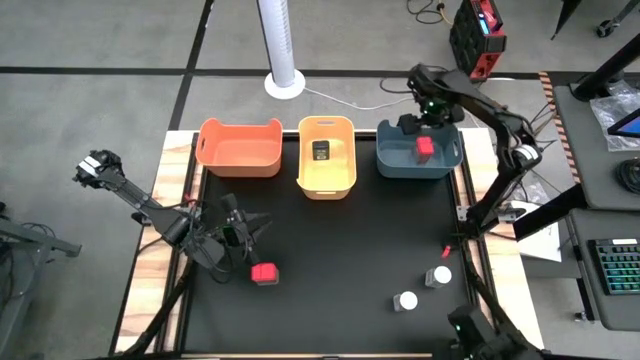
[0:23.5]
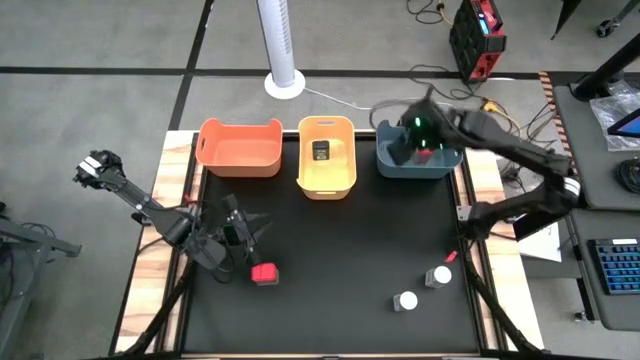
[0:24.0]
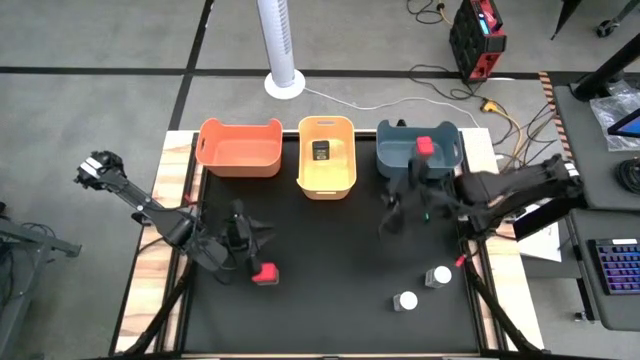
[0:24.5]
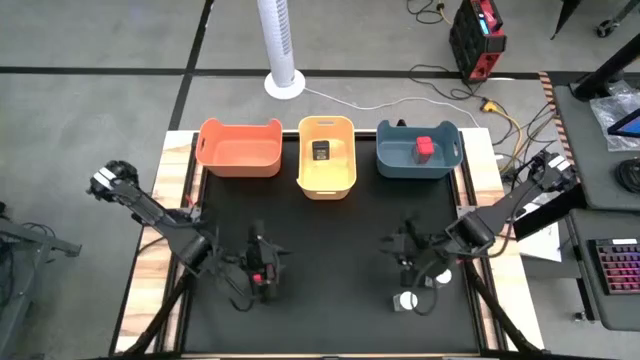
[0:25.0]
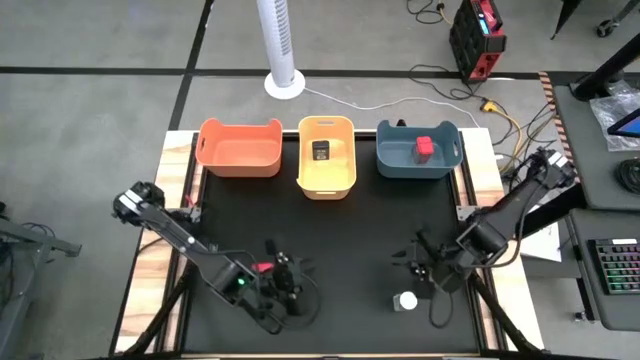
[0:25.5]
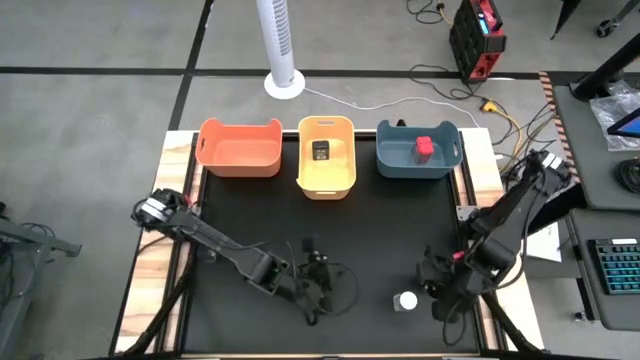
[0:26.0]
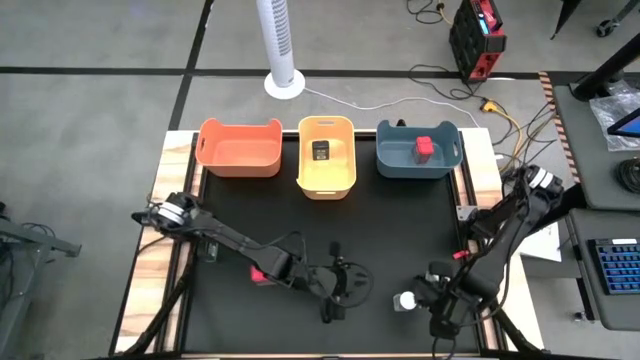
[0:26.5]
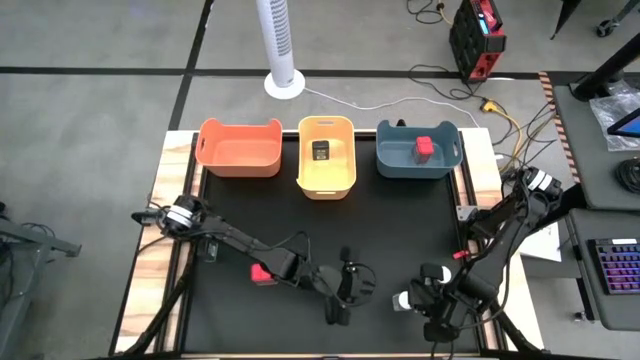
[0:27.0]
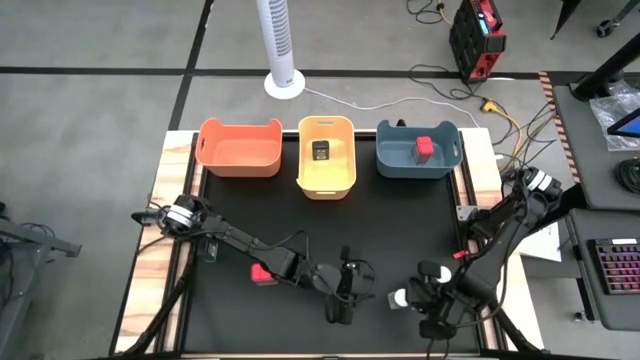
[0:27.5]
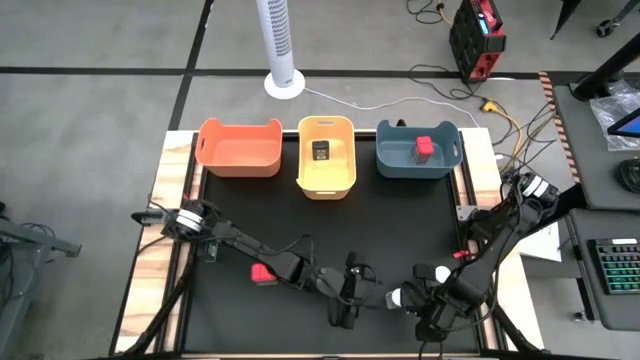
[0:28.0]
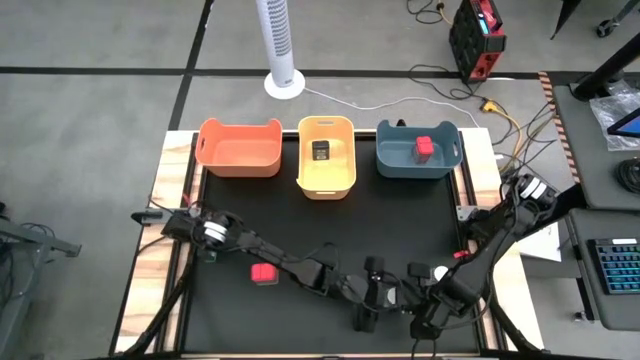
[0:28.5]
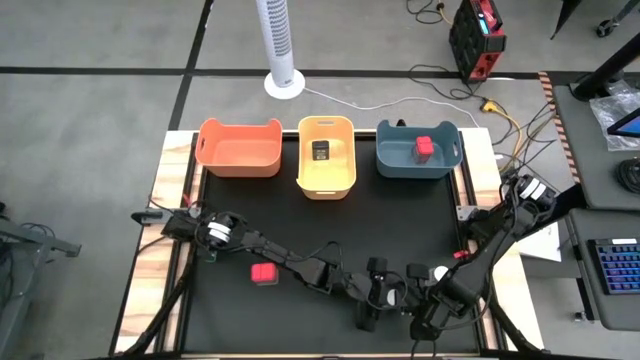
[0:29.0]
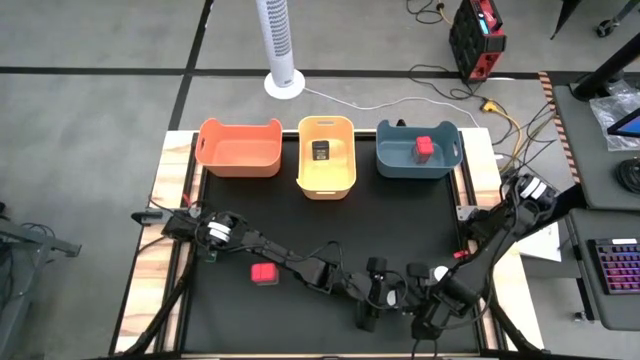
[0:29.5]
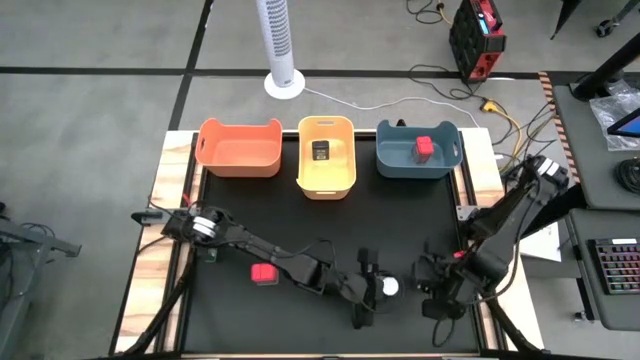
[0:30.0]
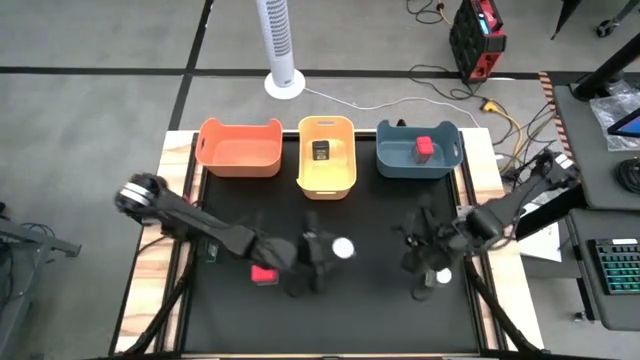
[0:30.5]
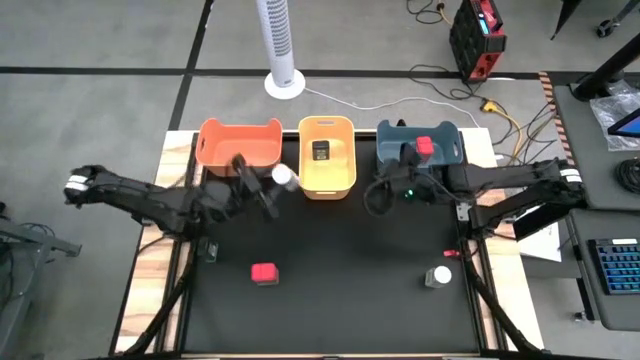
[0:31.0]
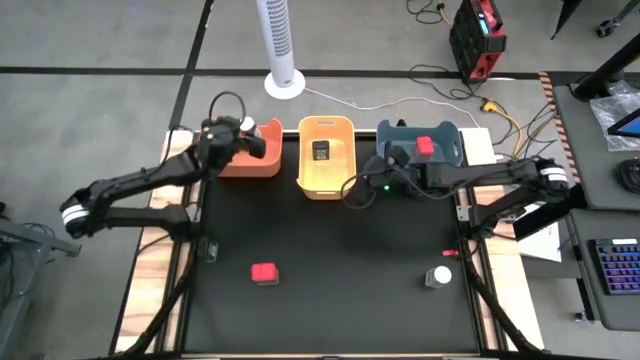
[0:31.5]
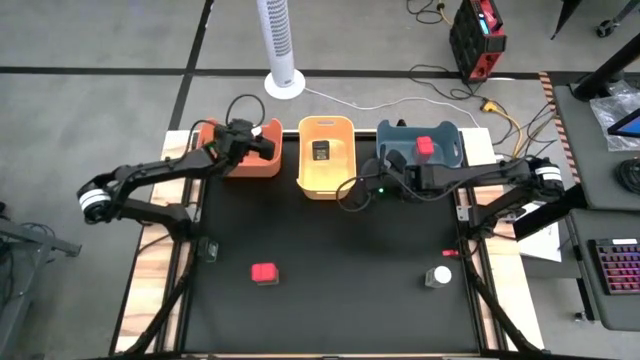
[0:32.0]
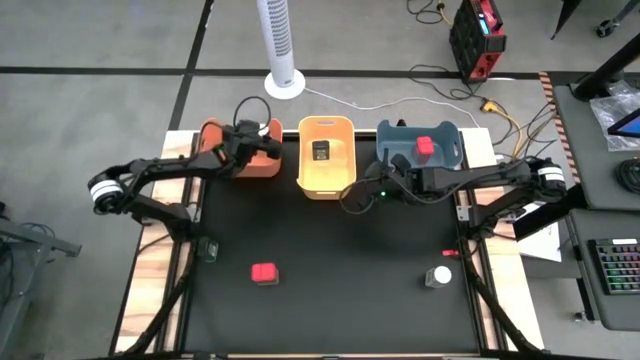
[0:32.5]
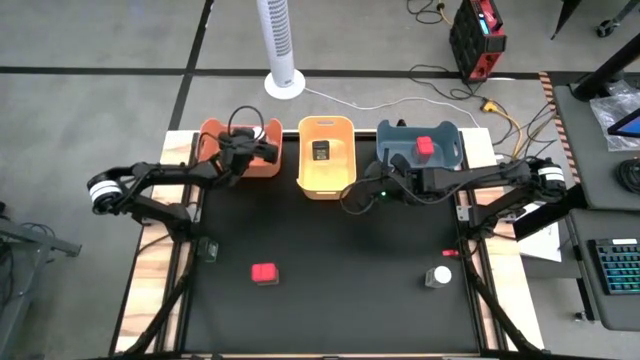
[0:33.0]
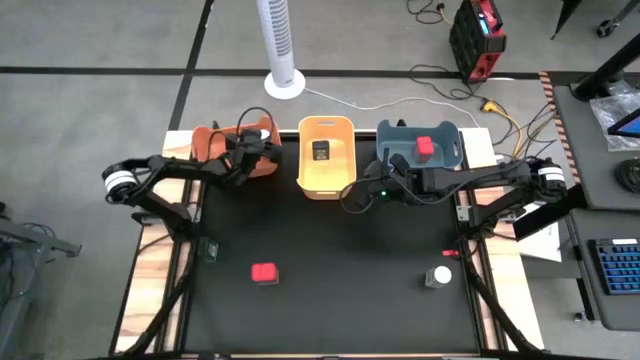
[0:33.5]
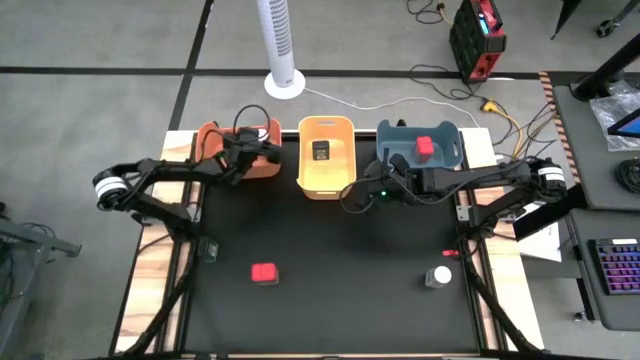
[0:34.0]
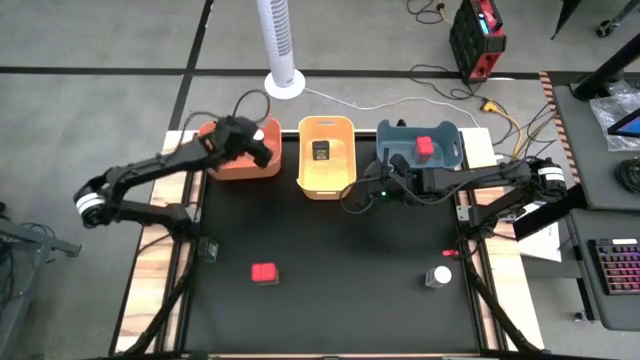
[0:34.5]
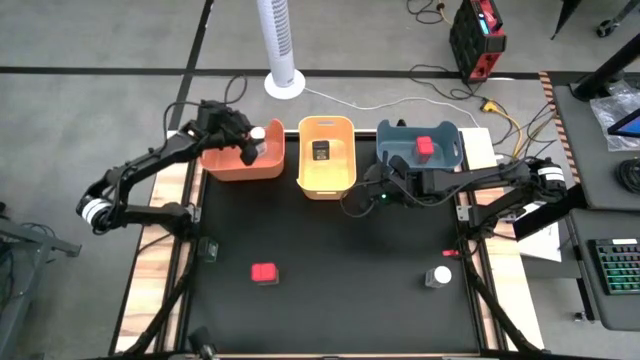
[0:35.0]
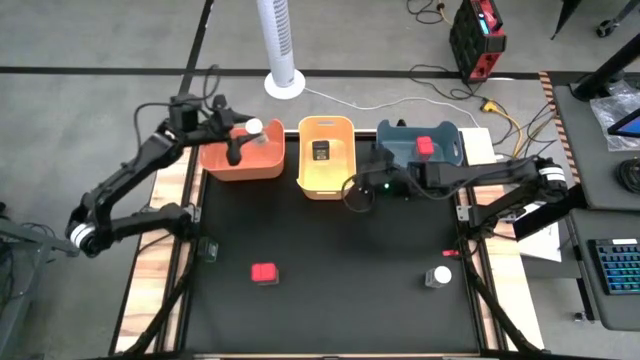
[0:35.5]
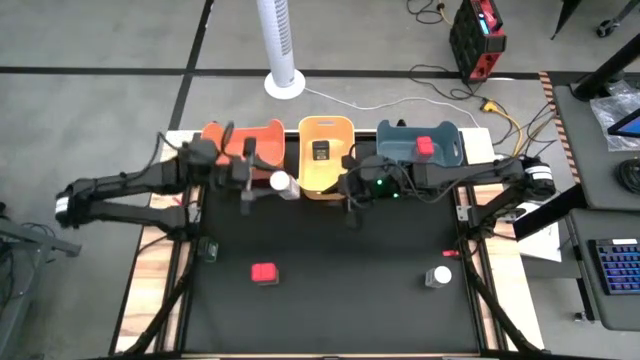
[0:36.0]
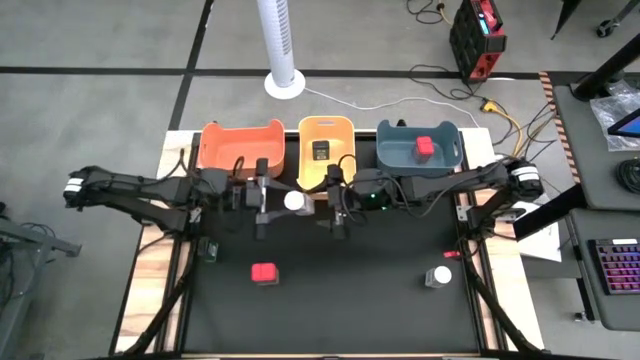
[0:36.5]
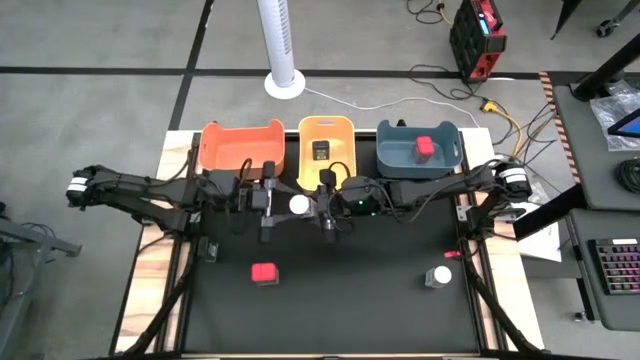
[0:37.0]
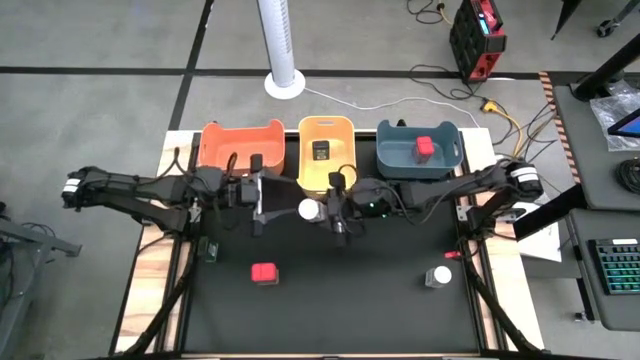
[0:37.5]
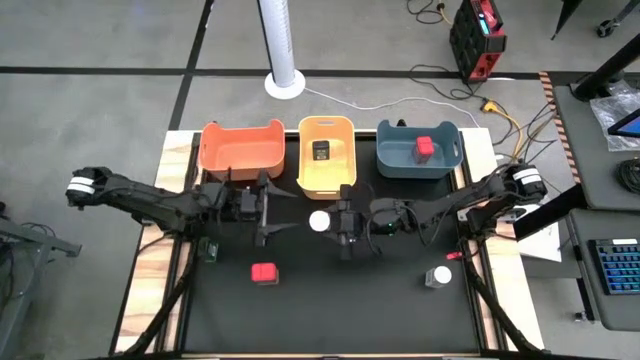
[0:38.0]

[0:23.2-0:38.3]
Task: Sort spices by type
Put the left white spice bottle into the orange bin

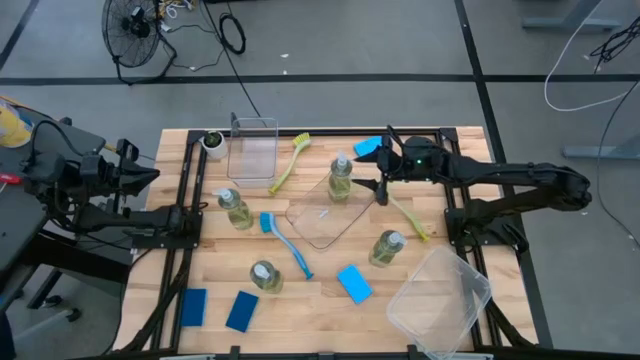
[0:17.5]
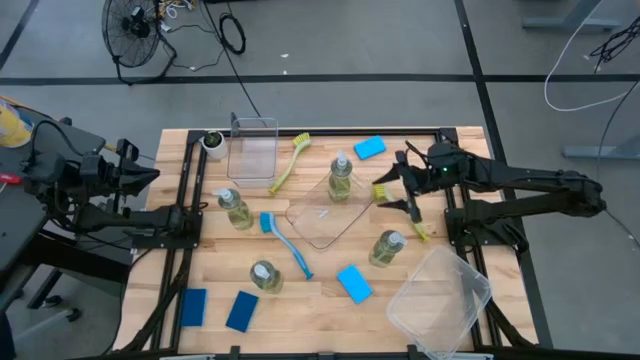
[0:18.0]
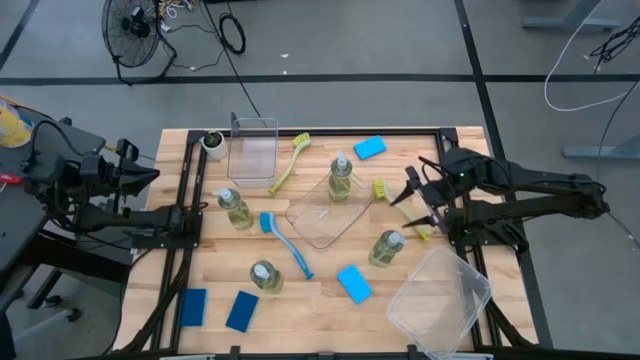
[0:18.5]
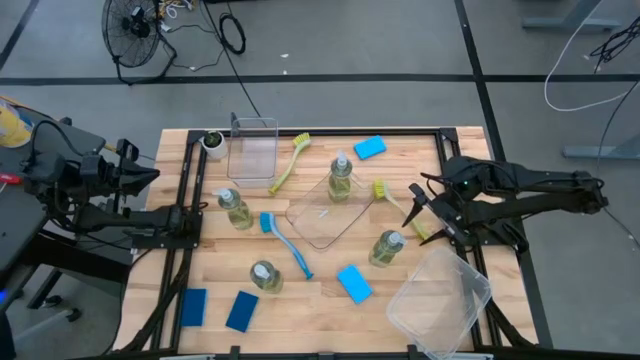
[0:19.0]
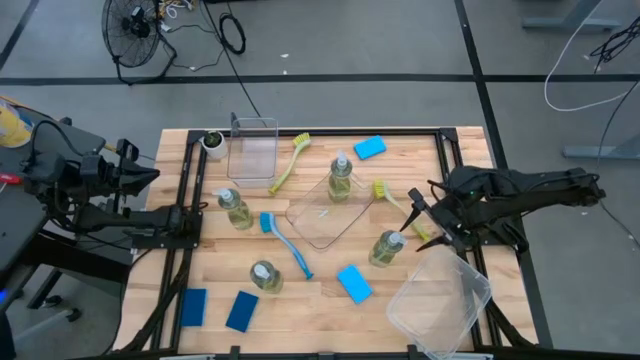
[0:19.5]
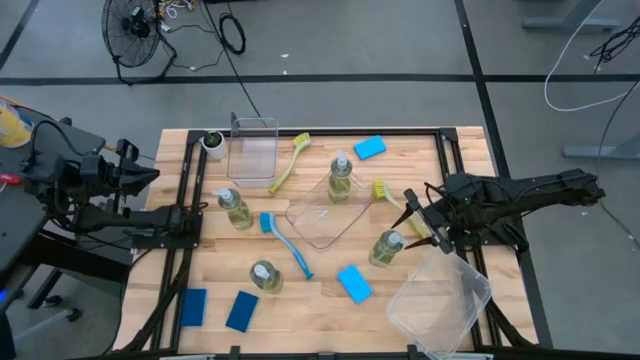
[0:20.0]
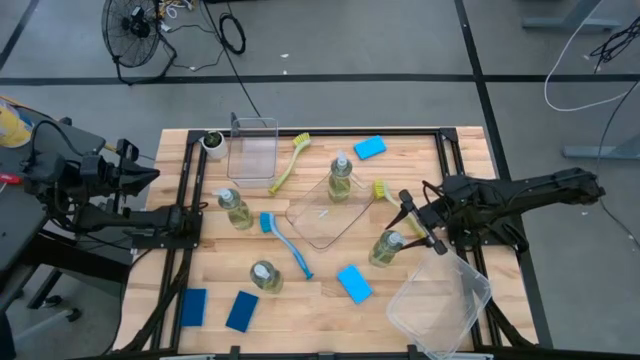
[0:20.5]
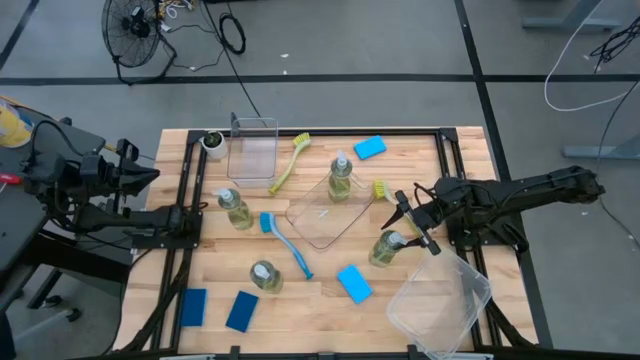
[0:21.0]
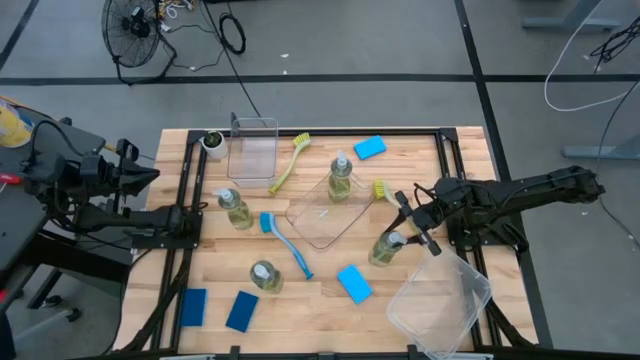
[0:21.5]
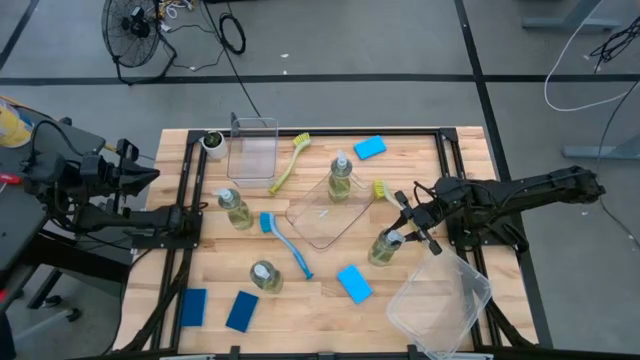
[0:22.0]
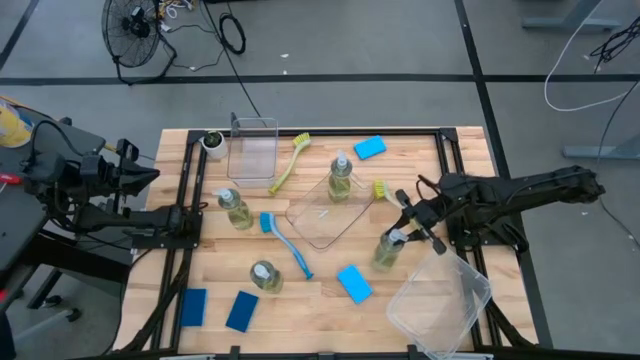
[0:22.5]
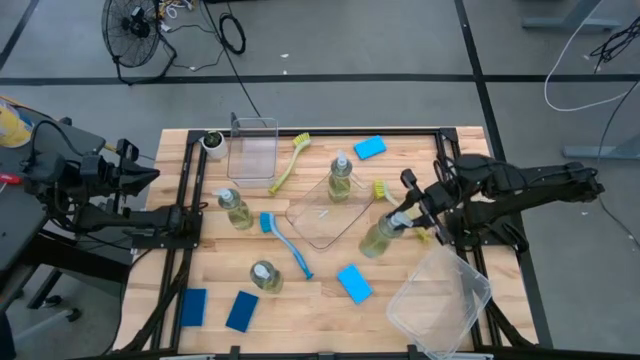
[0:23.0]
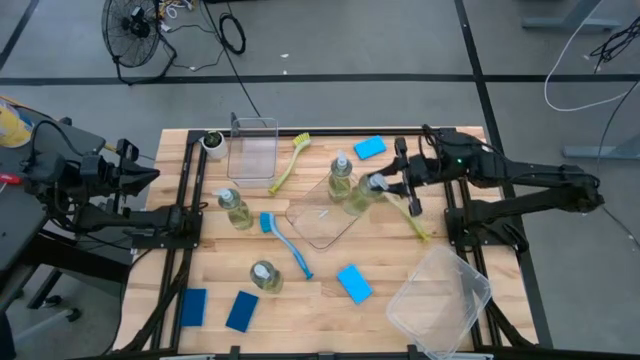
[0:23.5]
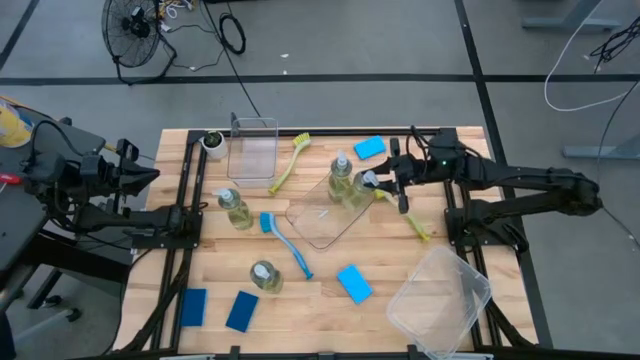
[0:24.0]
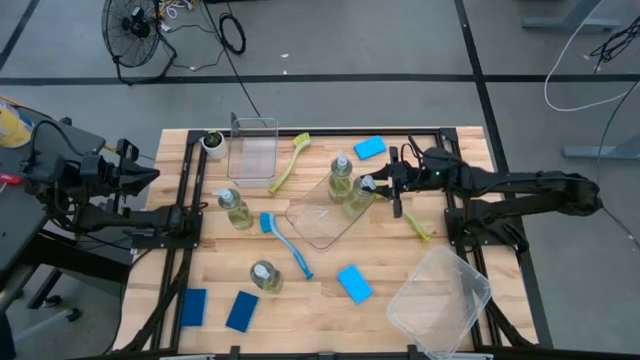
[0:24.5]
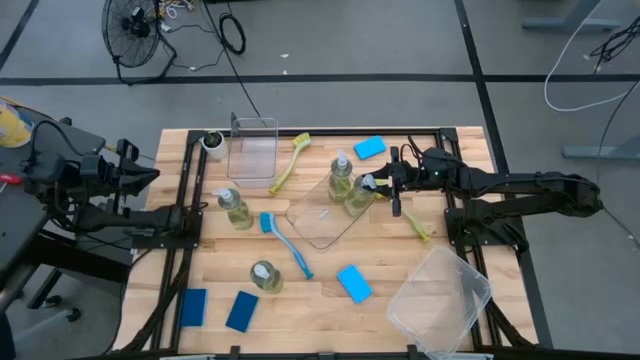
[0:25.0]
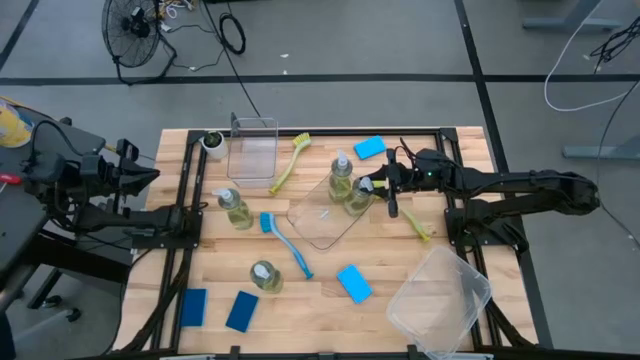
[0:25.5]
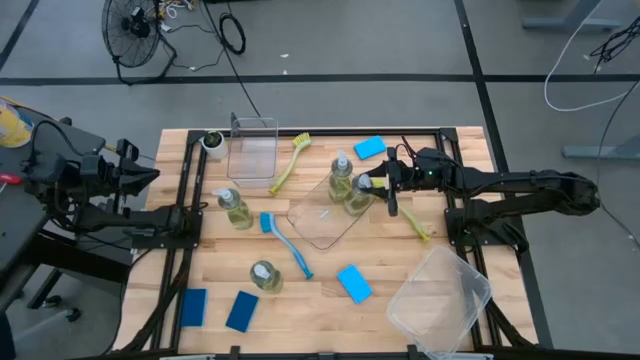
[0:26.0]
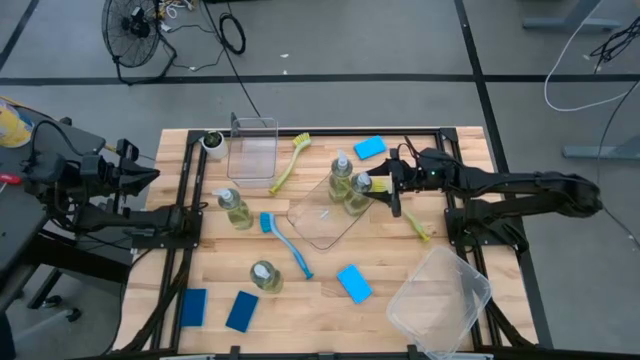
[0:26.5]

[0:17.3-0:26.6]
Task: Pick & Place Kitchen Sink Supplies
Put the dishwashing liquid bottle into the bottom transparent bin
